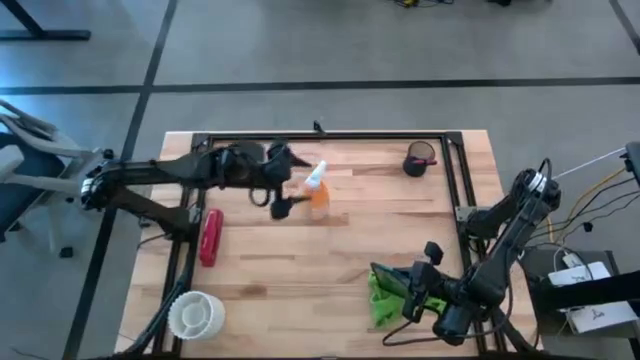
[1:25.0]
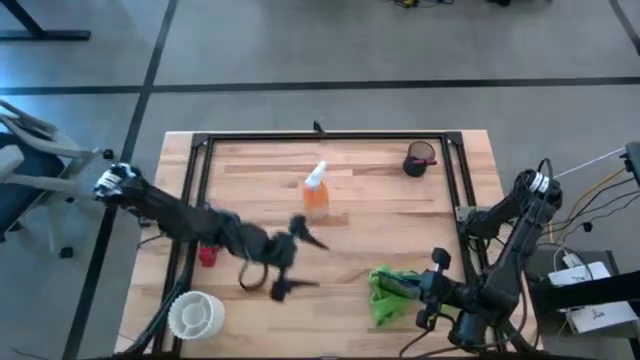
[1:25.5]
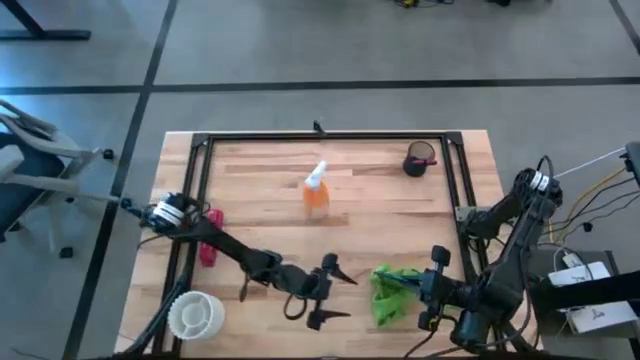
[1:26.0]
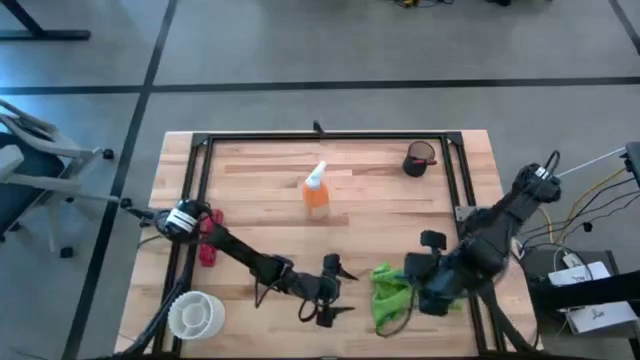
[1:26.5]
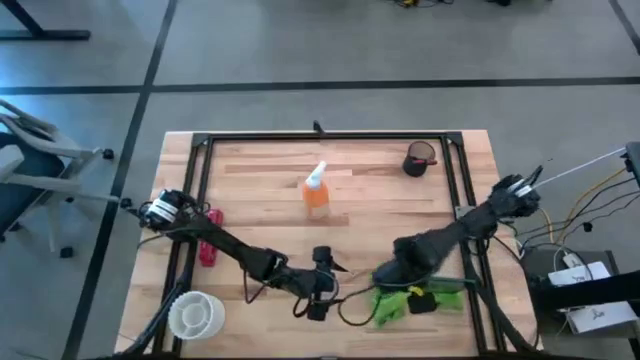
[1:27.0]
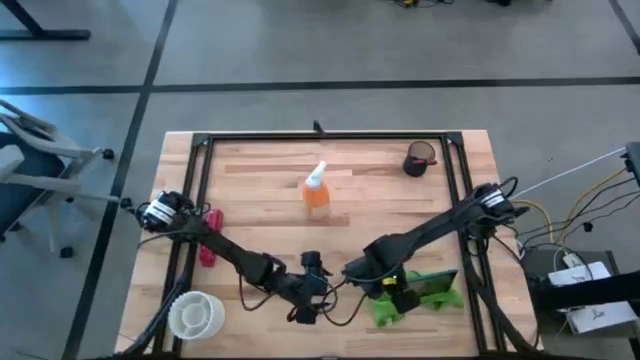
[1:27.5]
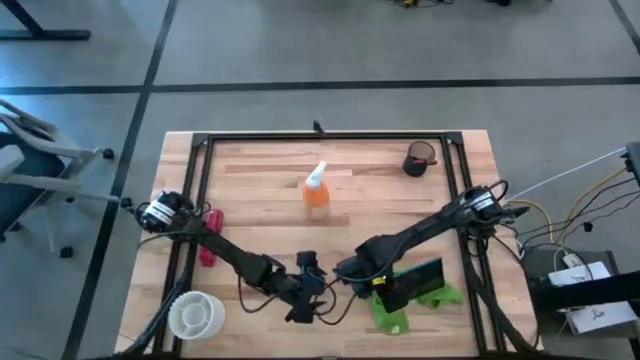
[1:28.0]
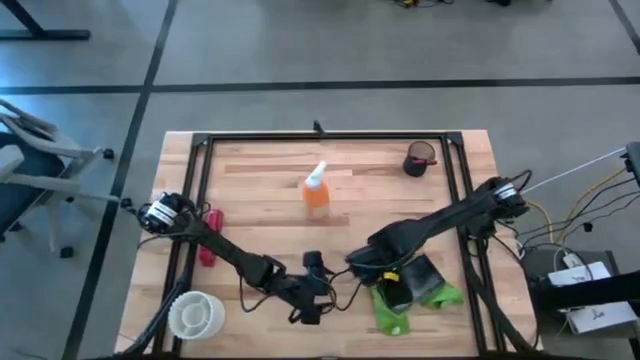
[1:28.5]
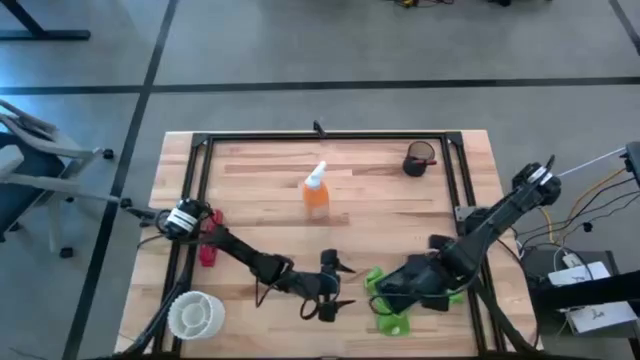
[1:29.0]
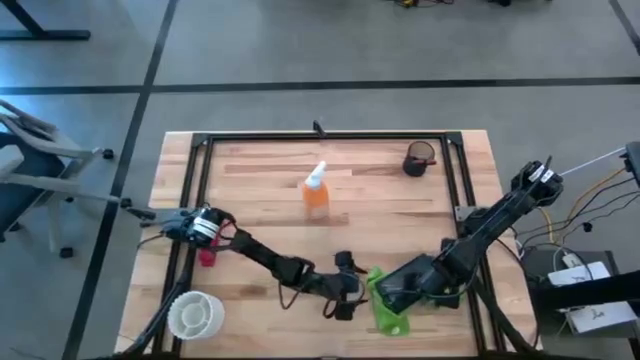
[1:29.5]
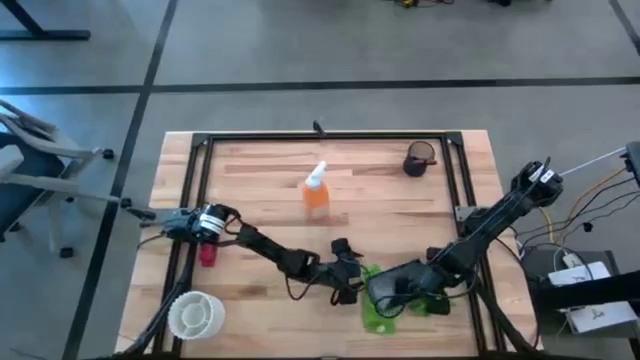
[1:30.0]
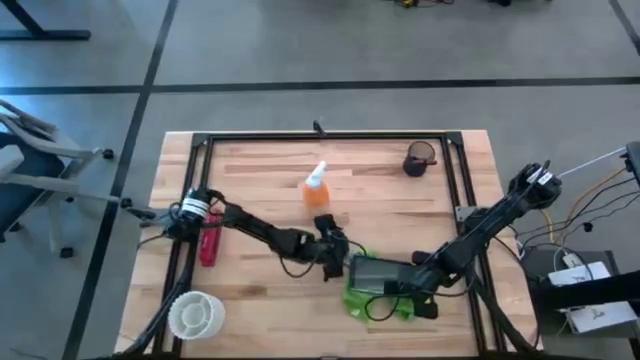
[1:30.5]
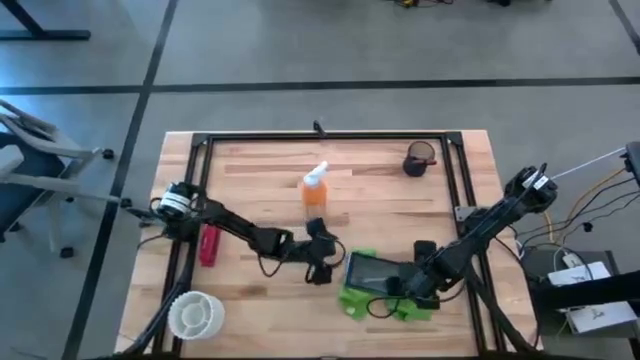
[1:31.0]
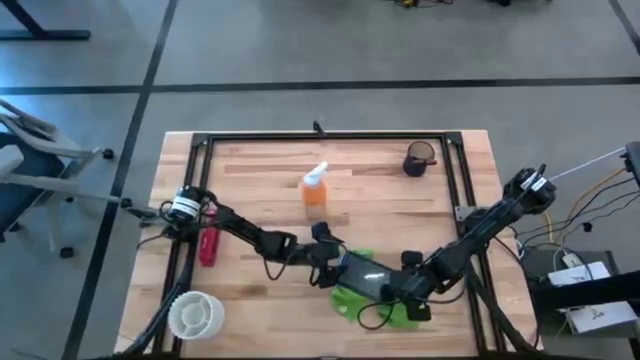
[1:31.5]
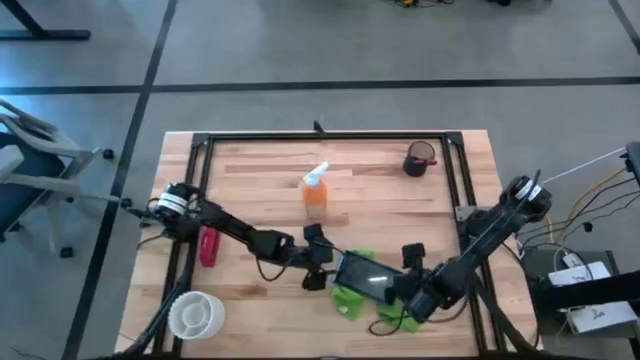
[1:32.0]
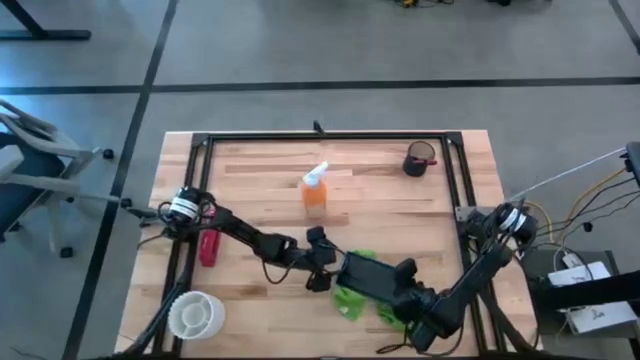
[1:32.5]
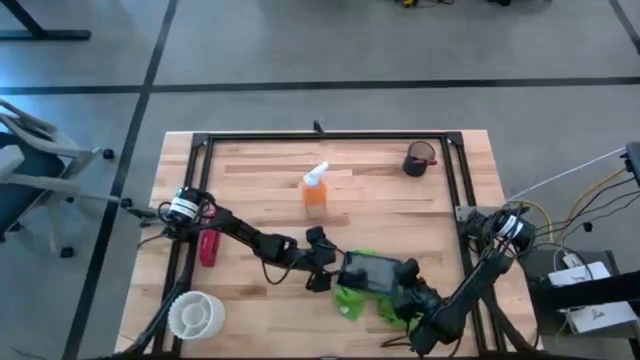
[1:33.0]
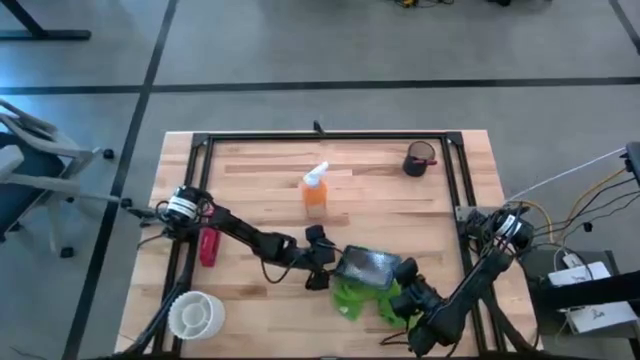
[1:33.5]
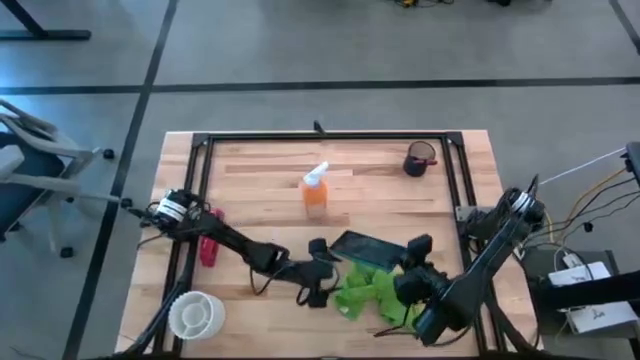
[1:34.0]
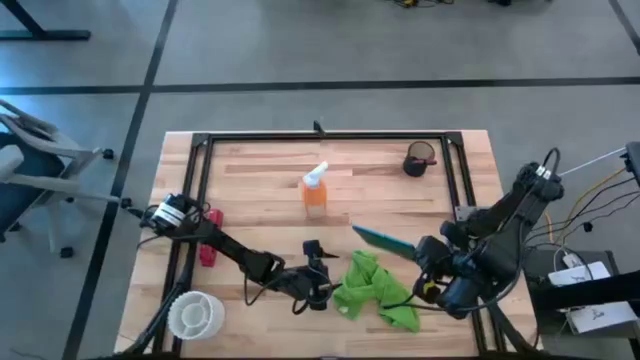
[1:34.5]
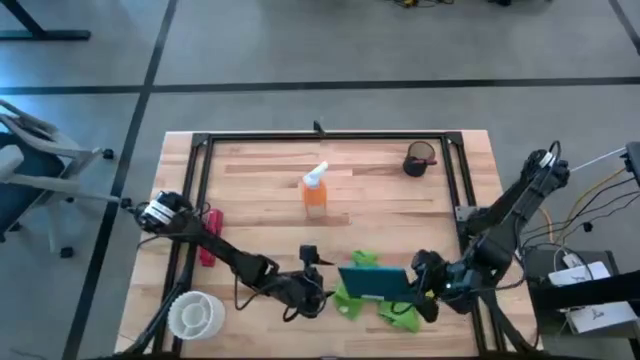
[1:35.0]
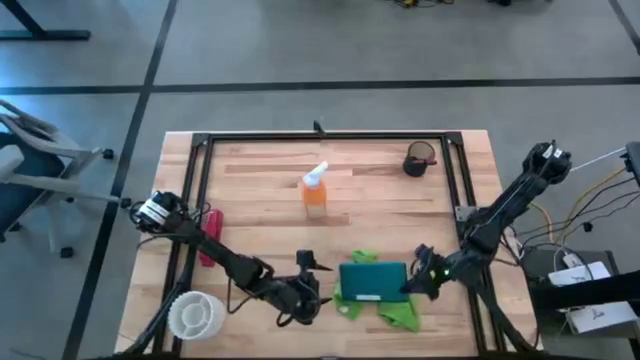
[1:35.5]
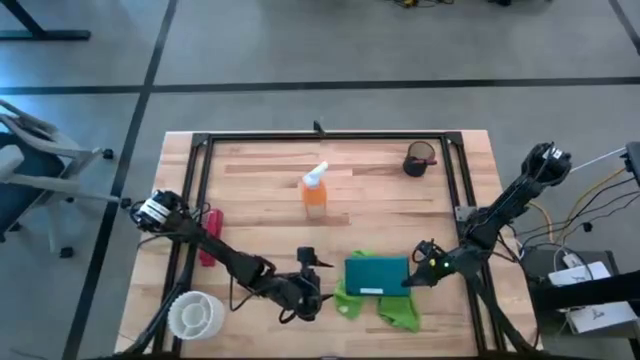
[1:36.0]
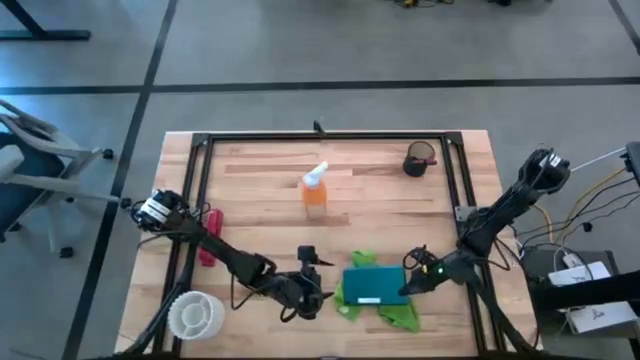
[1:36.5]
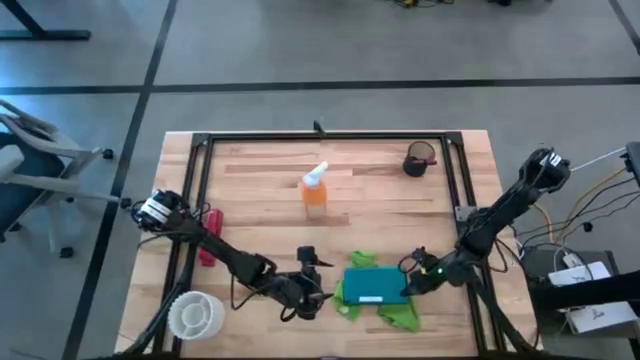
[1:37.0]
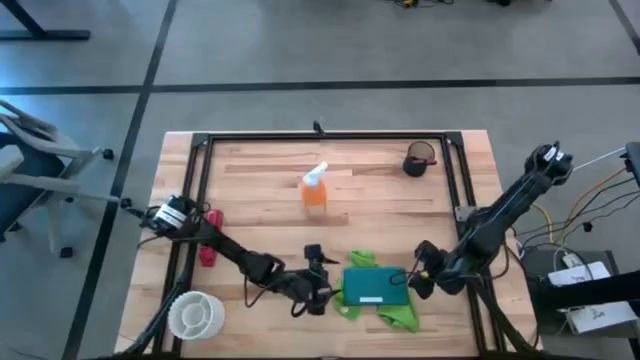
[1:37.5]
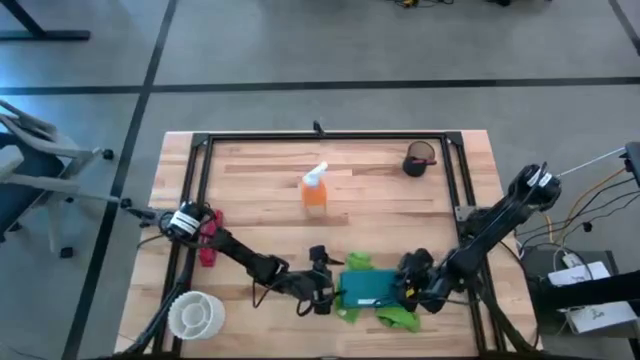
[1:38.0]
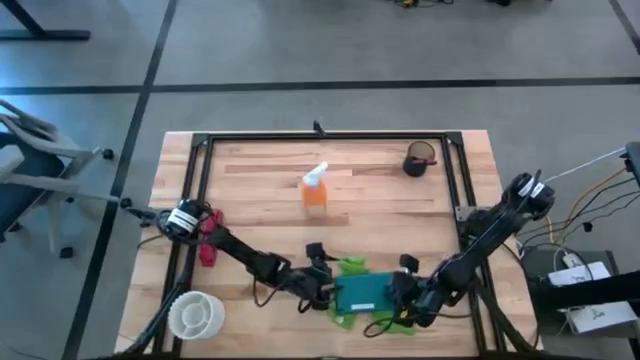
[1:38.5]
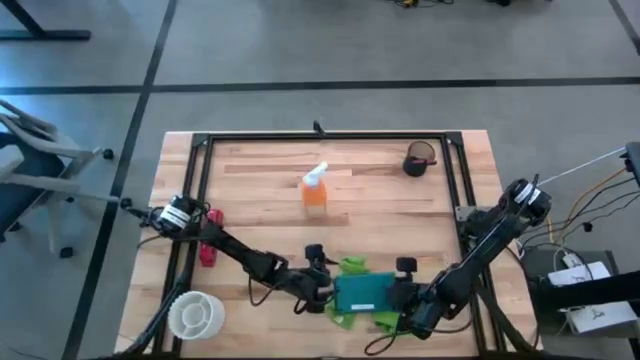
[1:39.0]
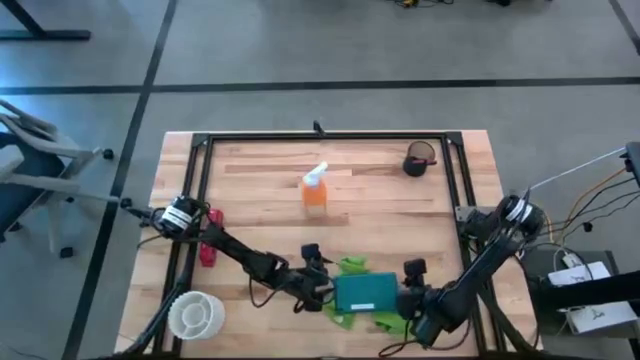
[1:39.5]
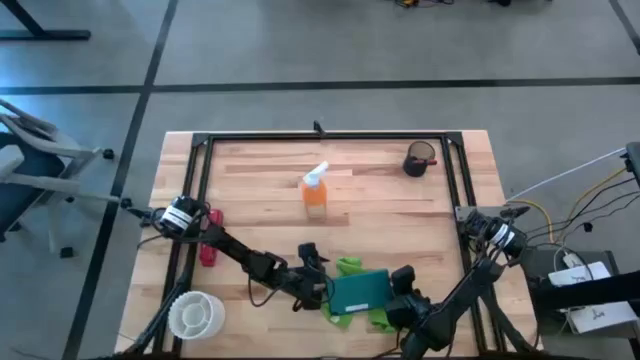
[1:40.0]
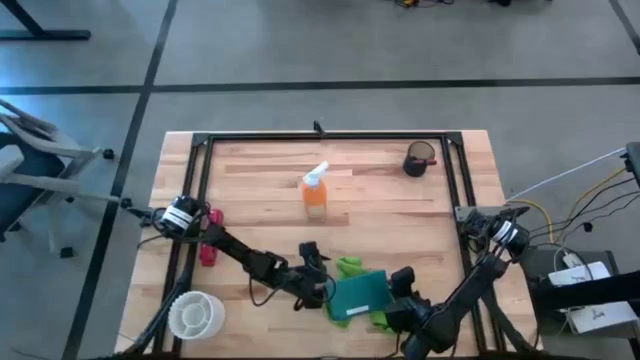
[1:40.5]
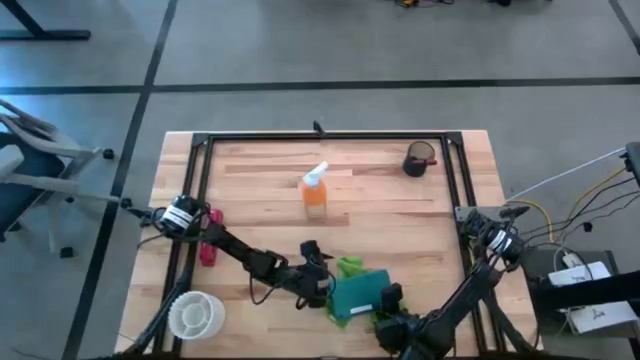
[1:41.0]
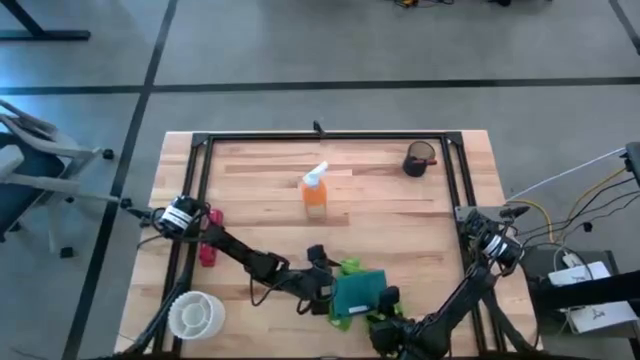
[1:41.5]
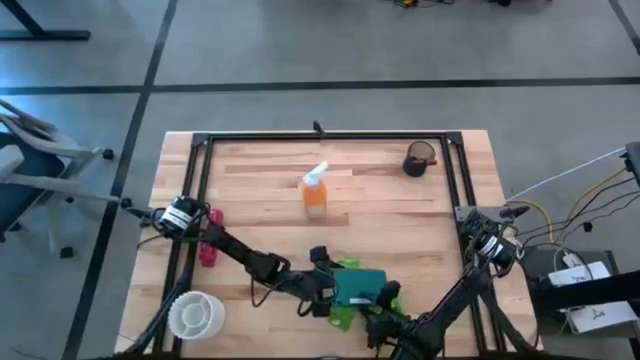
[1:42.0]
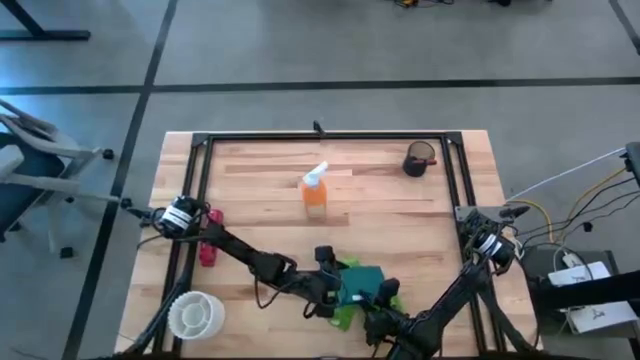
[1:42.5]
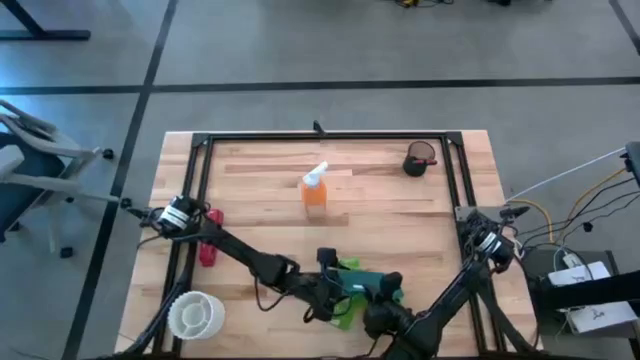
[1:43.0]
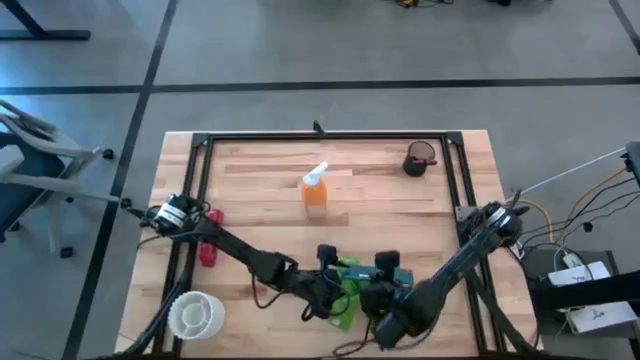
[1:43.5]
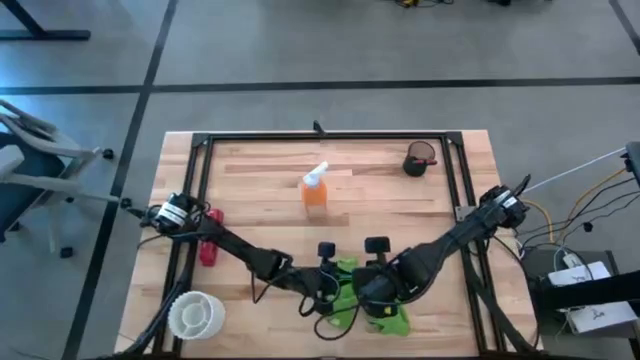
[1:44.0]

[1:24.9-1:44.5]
Task: Apply microfiber cloth
Wipe the front and back of the blue cellphone with the green microfiber cloth

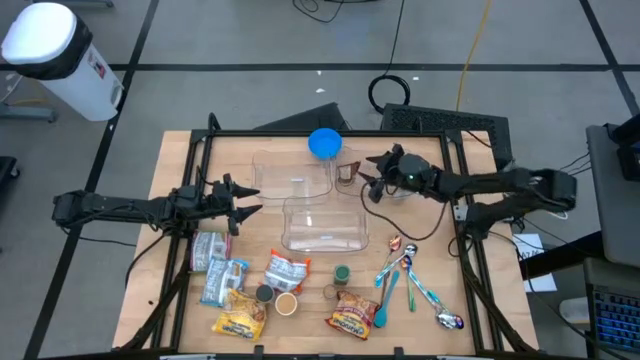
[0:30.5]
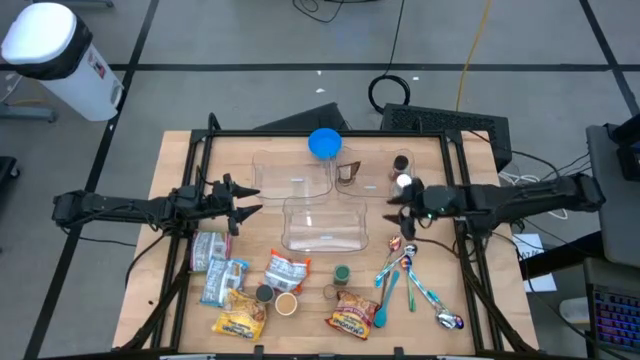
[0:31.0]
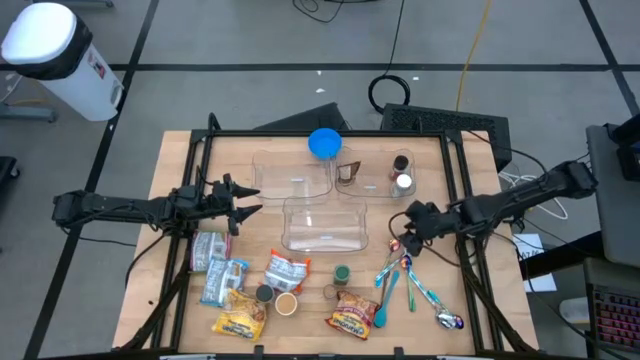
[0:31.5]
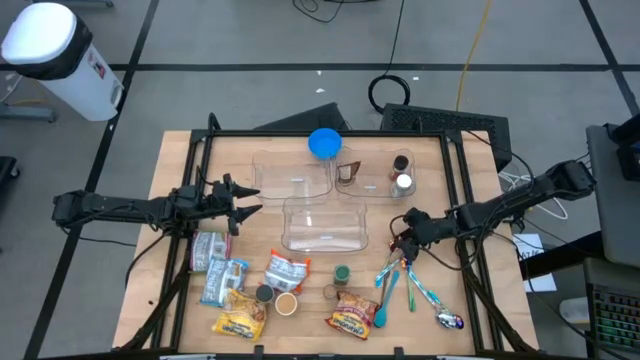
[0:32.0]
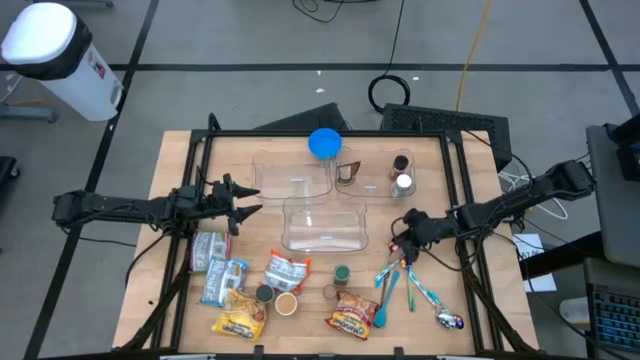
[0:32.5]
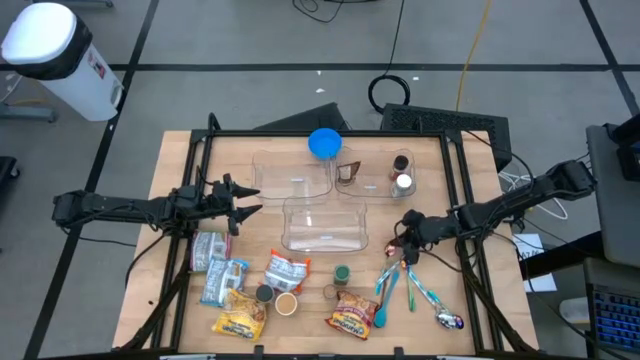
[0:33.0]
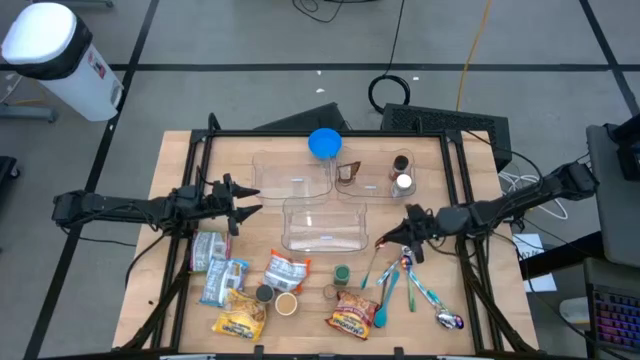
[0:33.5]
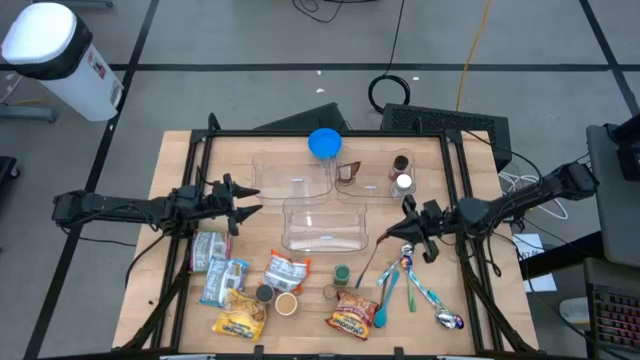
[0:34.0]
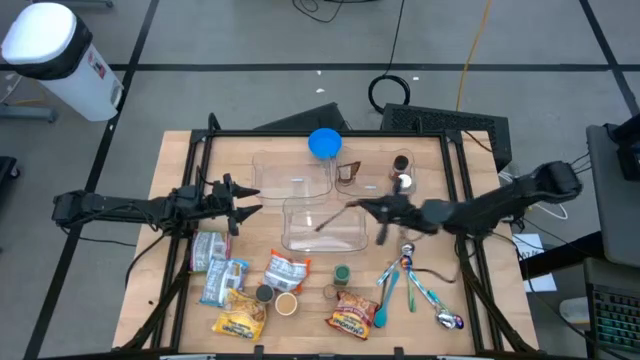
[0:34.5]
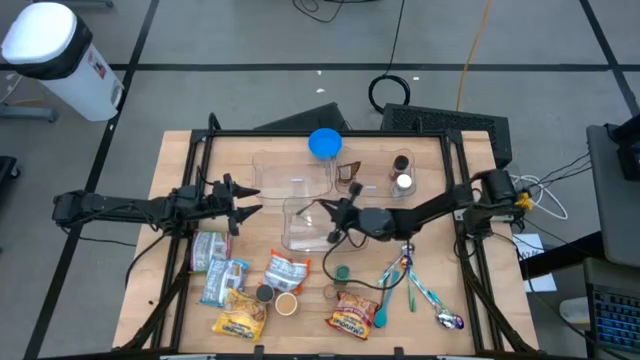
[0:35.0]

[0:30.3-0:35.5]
Task: Pick & Place Food Item
Put the top green spoon into the bottom transparent bin
